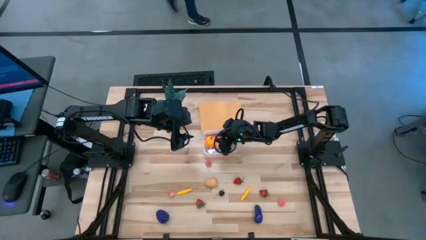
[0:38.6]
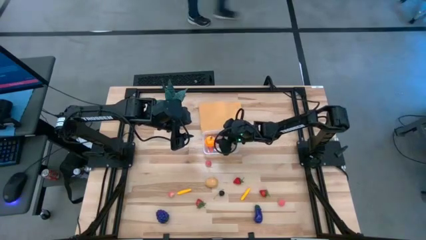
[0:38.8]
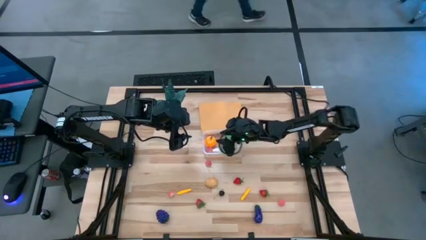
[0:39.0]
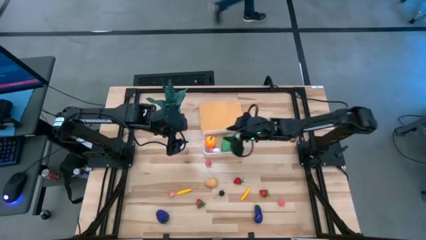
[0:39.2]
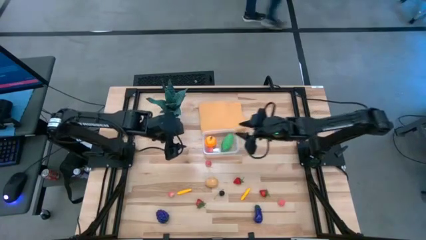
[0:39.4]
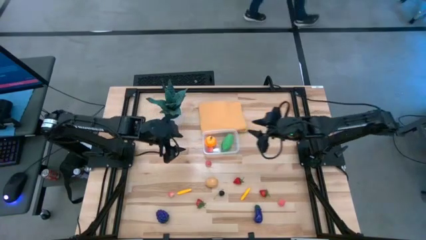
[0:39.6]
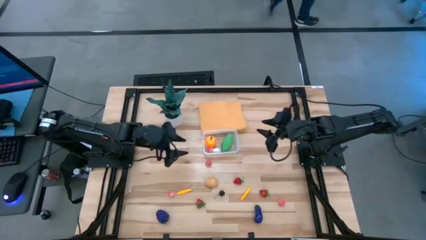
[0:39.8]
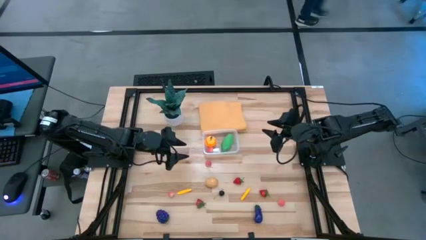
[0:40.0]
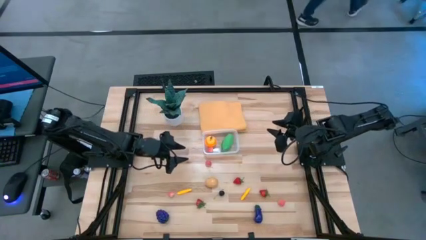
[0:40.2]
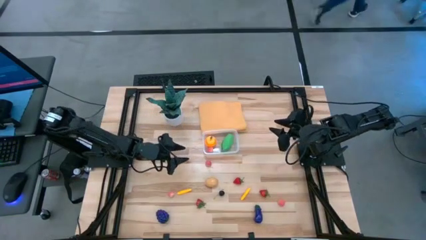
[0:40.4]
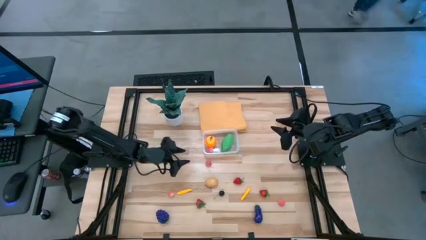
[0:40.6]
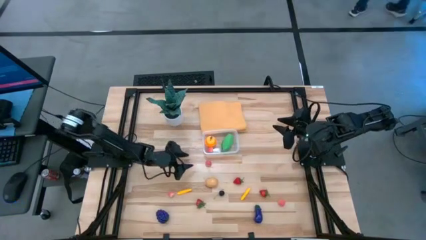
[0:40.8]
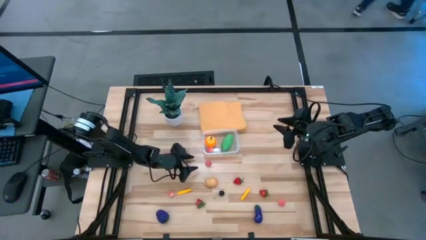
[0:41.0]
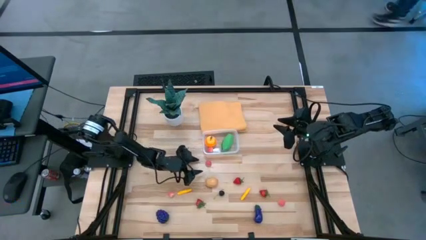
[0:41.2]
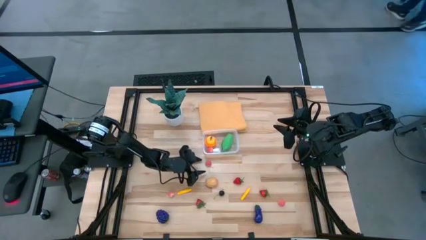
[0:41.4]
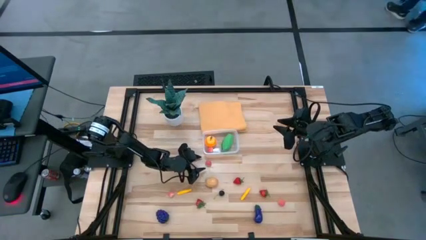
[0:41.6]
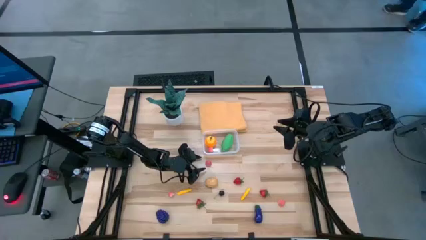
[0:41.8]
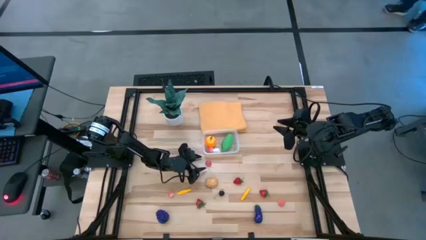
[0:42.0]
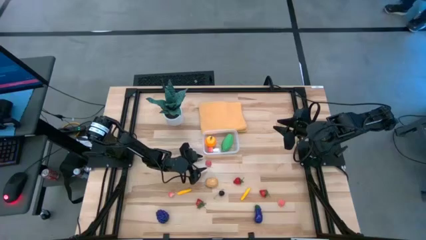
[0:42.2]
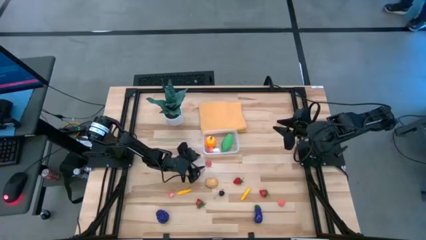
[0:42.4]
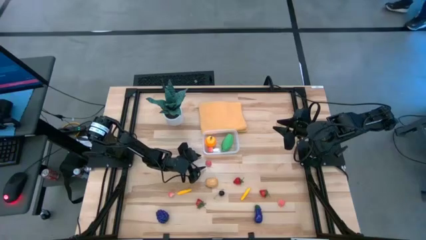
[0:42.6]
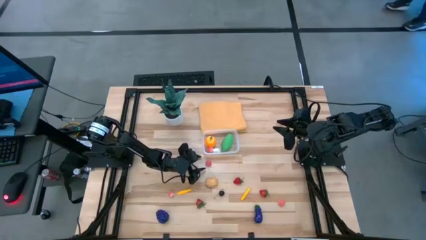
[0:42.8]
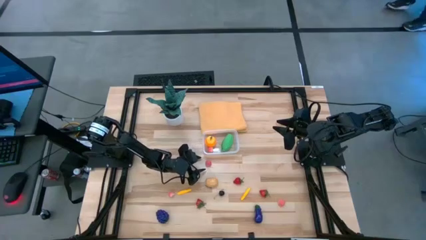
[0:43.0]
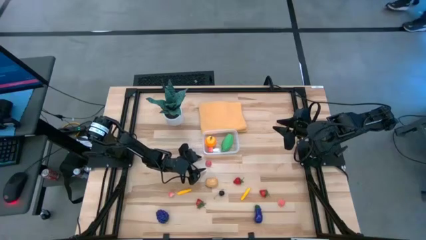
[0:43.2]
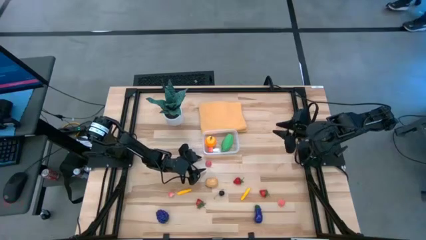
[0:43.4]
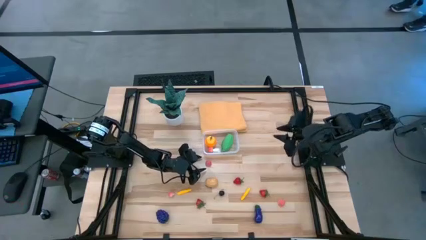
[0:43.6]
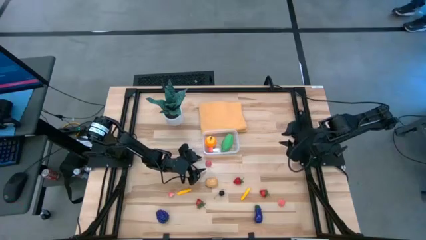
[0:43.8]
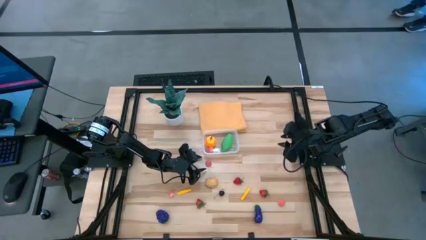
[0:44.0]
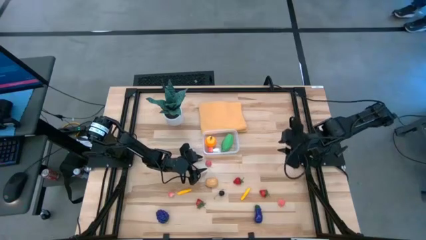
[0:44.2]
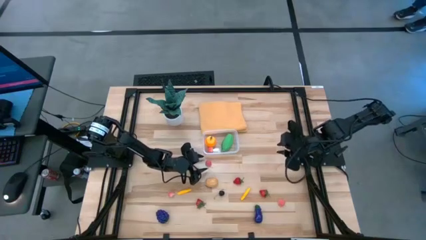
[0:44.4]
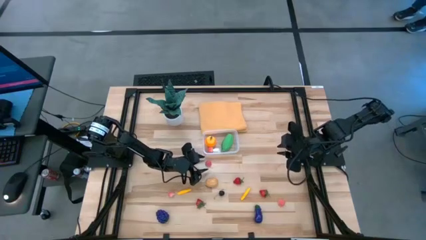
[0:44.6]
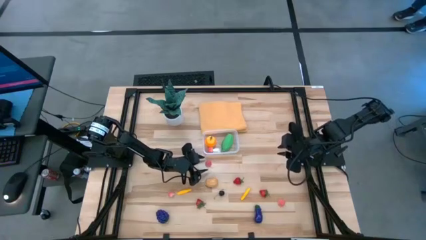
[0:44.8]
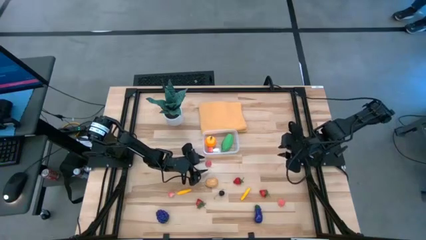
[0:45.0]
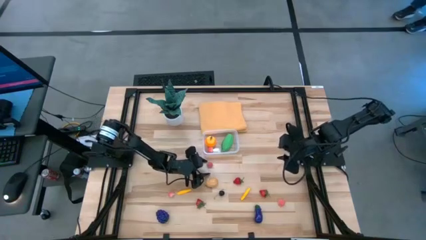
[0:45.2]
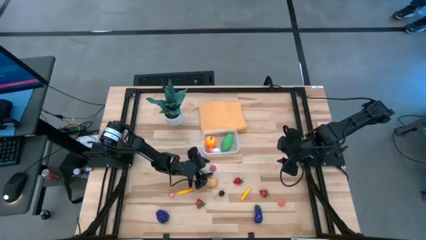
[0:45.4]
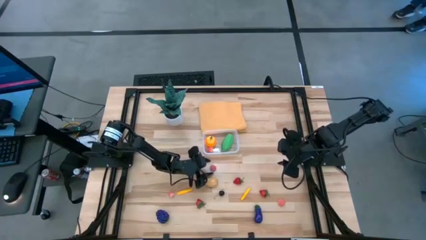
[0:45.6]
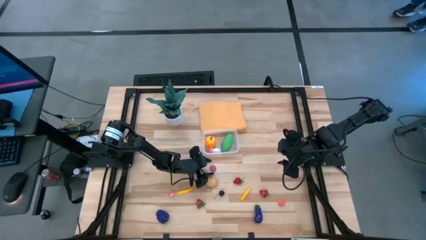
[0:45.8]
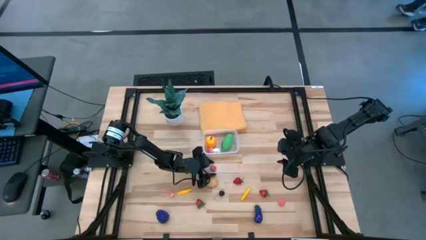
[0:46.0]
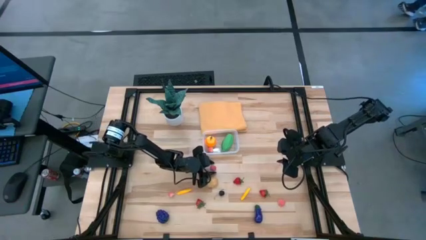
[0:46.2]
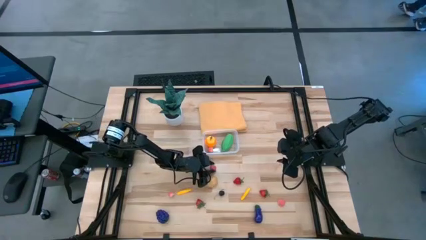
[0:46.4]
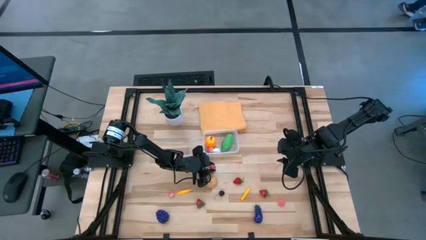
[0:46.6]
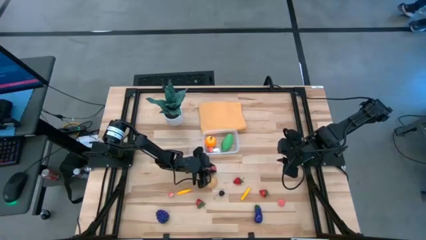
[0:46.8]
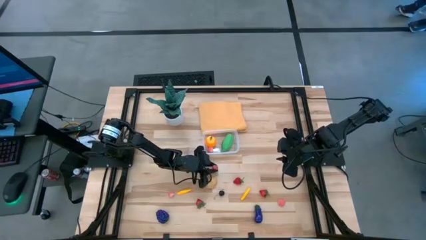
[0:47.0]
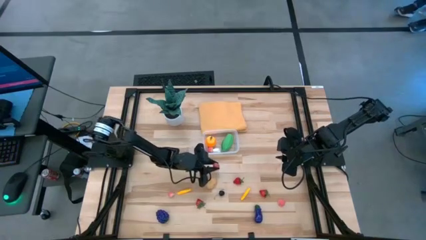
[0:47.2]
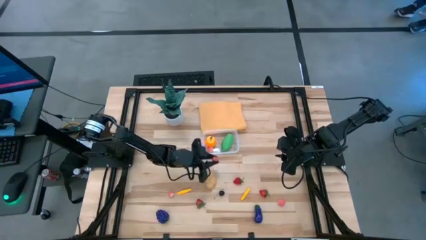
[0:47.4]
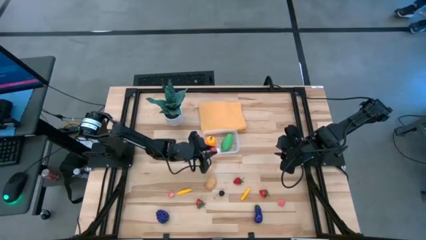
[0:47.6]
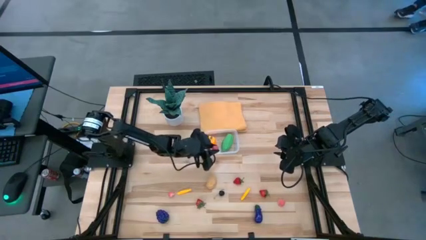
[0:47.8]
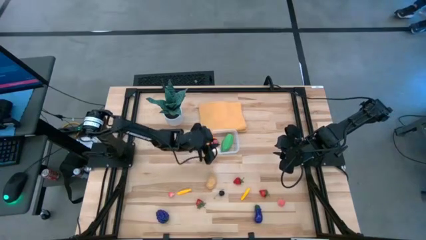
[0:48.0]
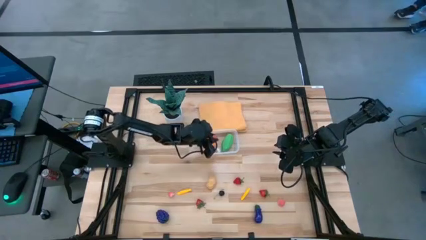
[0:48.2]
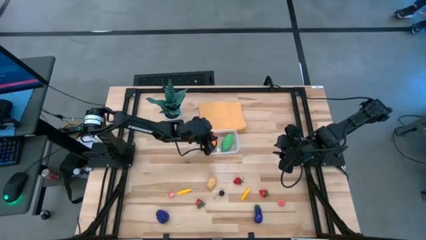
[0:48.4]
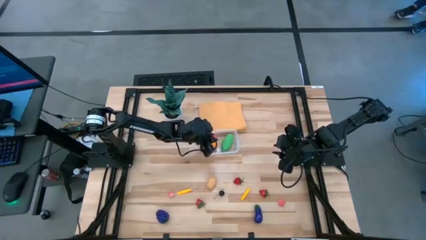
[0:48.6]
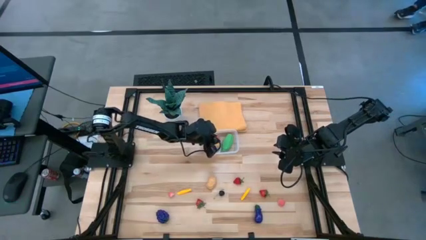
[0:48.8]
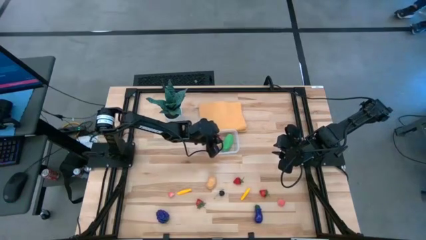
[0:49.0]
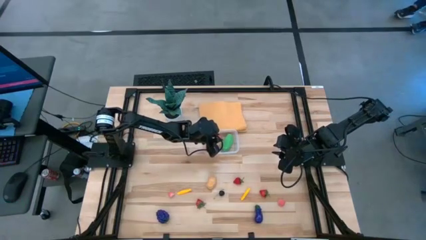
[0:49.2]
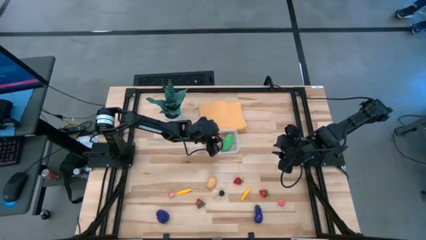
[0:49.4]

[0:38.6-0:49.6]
Task: Pick and placing Produce into tupperware
Put the top pink apricot into the transparent bin

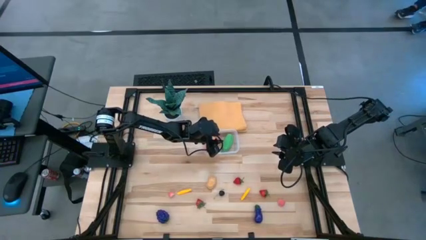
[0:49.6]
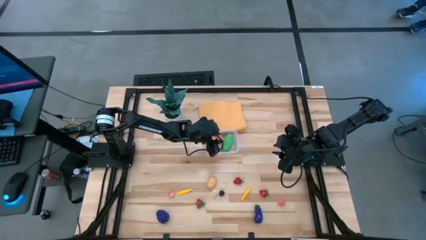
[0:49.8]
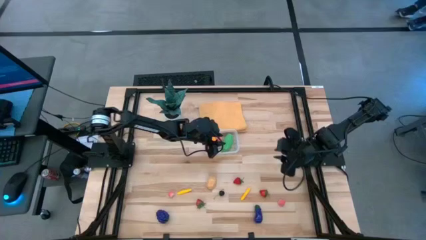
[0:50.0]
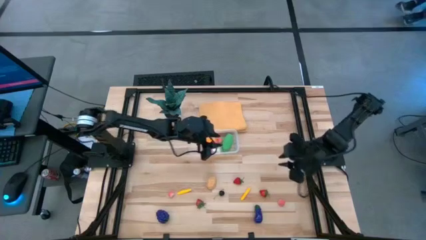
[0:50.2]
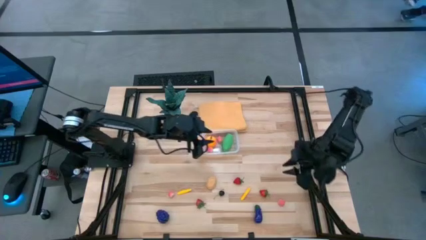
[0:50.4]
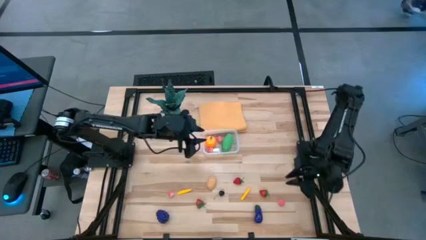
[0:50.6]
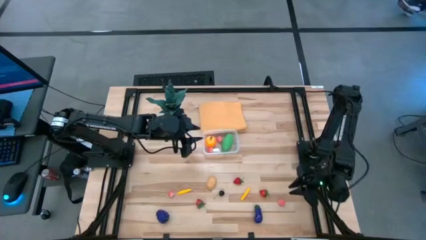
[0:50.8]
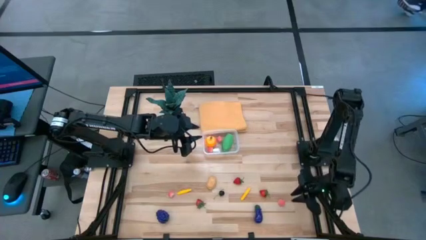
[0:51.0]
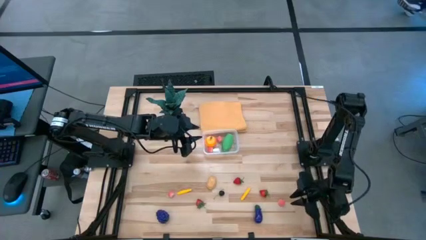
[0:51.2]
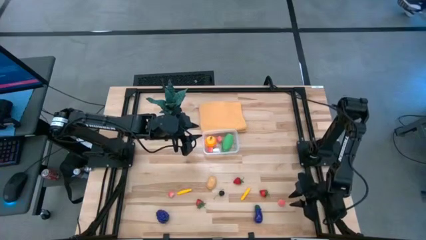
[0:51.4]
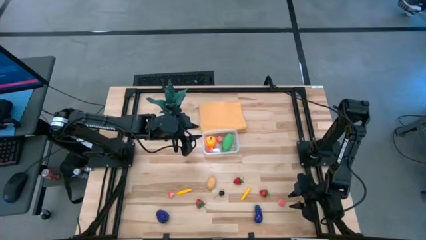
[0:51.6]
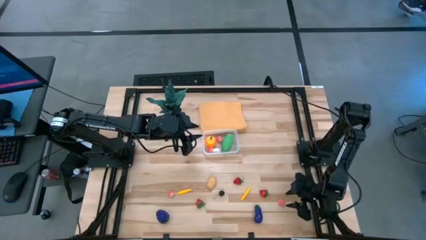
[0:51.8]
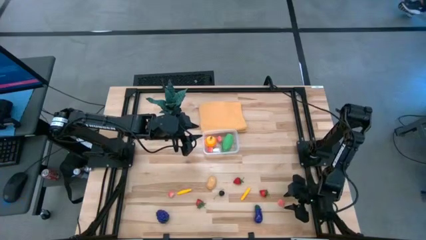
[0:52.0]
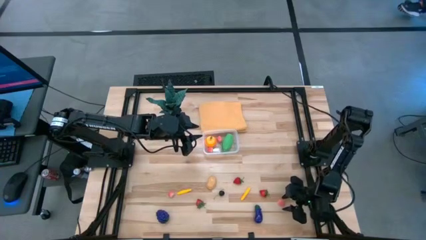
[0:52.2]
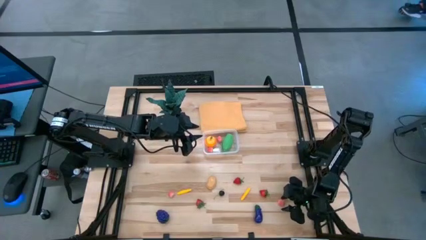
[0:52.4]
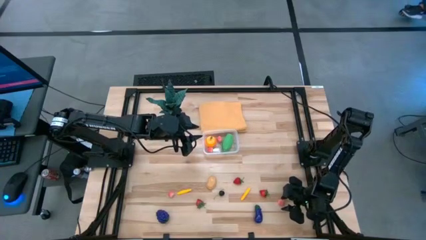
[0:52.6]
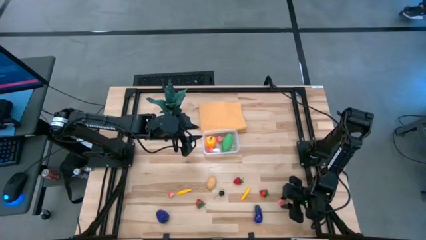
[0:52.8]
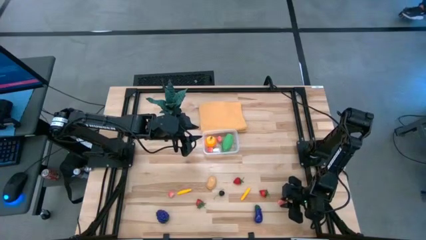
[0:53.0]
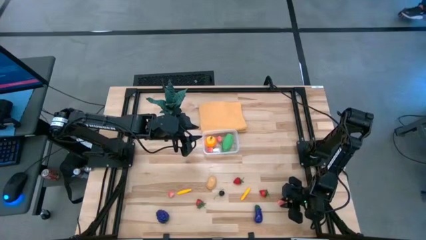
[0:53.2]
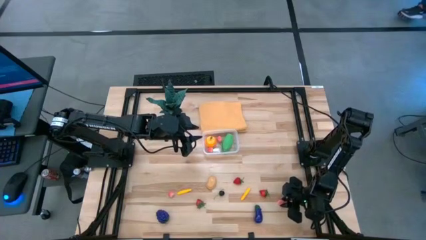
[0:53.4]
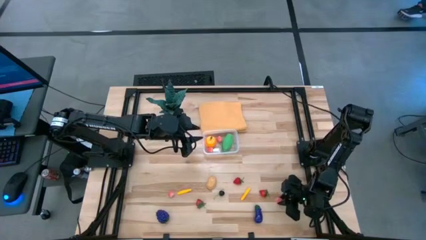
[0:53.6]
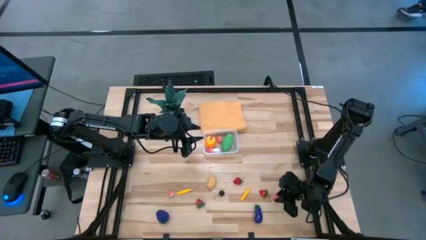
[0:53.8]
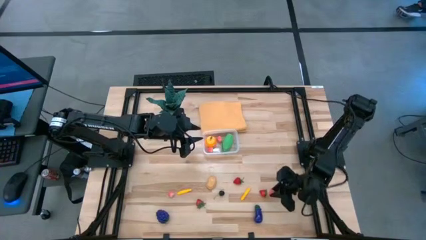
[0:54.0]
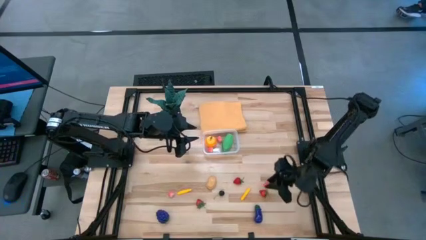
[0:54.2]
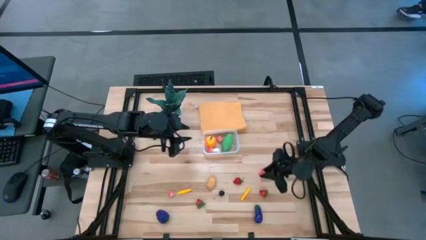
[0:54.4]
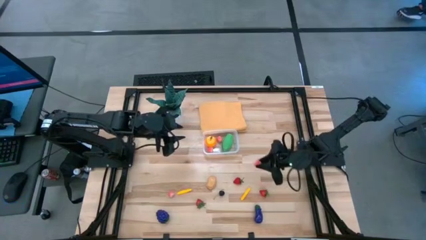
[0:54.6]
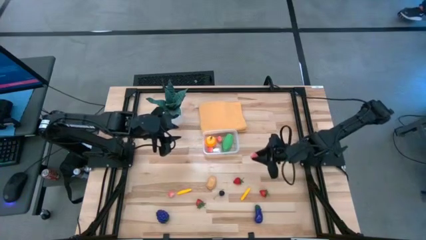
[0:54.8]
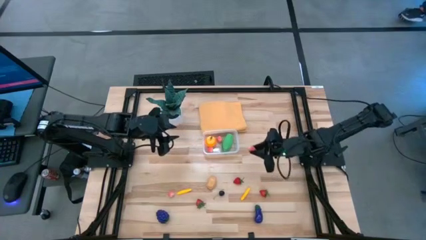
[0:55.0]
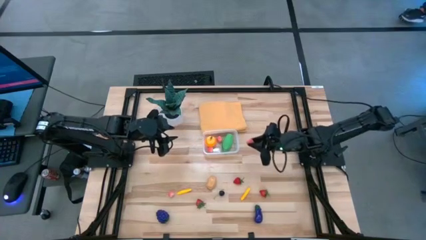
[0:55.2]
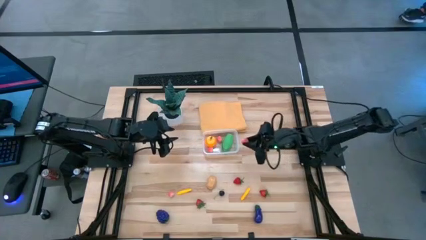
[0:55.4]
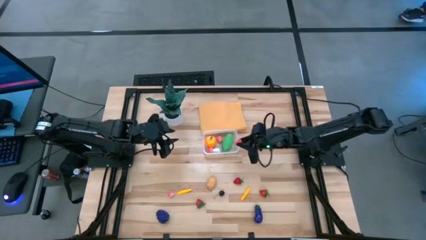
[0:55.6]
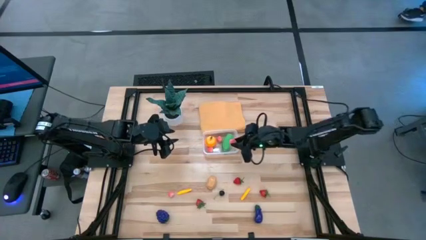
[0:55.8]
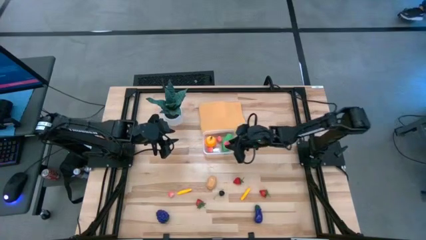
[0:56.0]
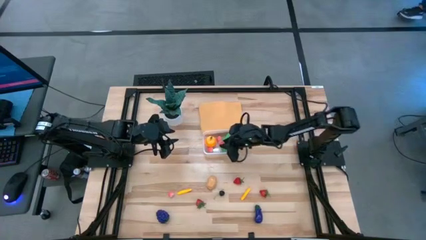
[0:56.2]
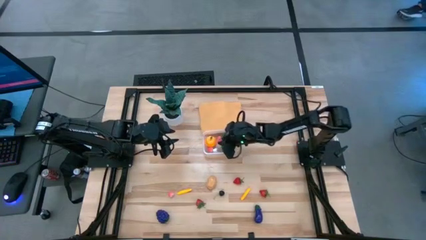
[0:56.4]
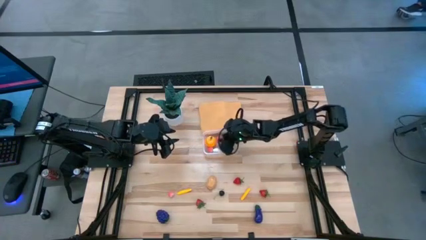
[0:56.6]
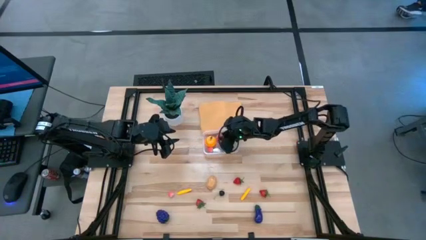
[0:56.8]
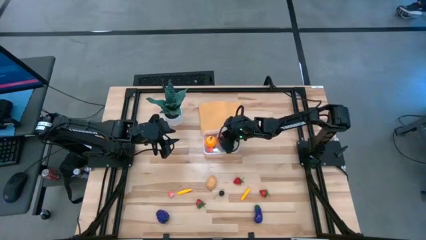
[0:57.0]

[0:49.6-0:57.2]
Put the right pink apricot into the transparent bin
